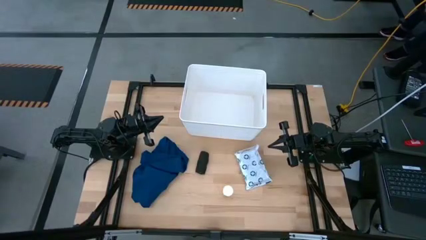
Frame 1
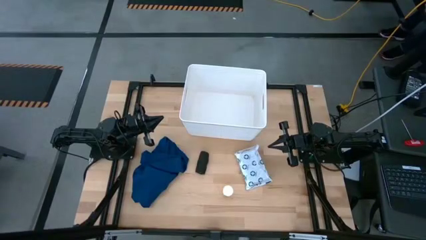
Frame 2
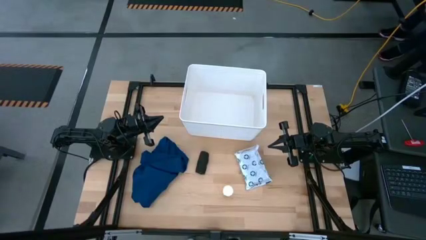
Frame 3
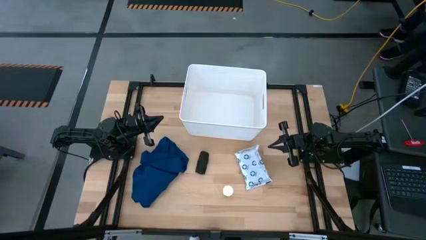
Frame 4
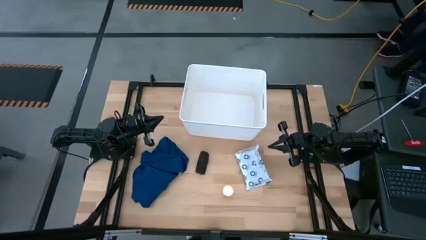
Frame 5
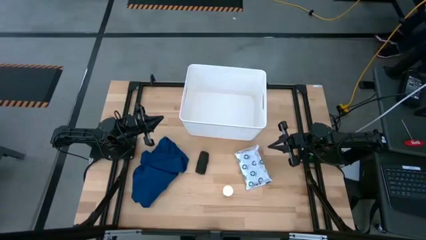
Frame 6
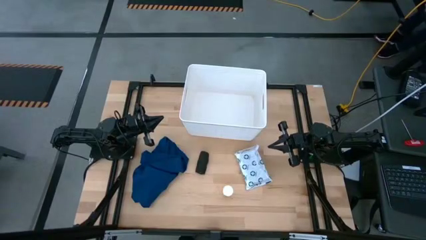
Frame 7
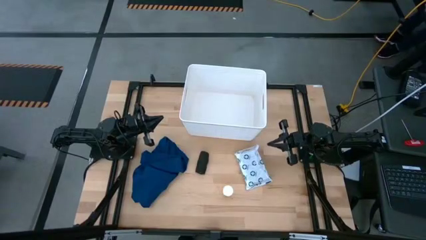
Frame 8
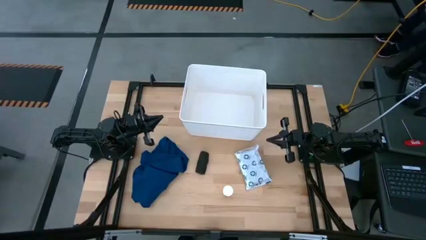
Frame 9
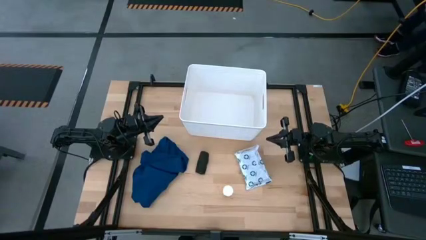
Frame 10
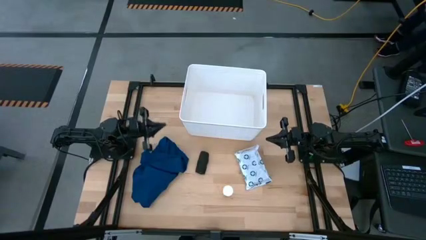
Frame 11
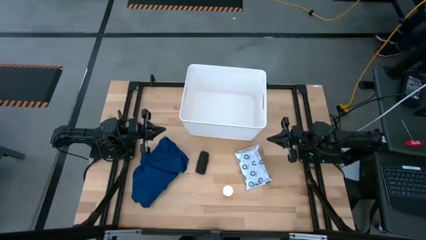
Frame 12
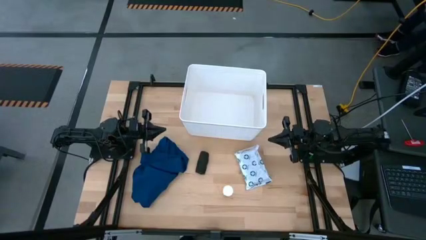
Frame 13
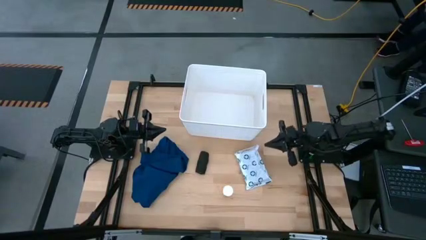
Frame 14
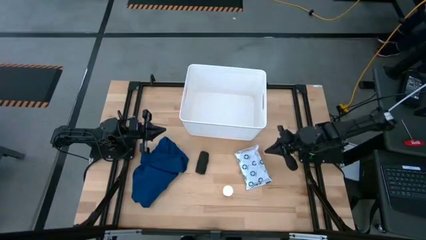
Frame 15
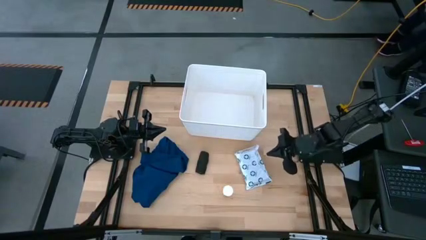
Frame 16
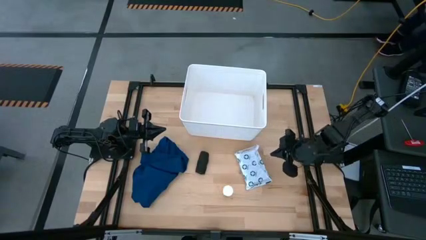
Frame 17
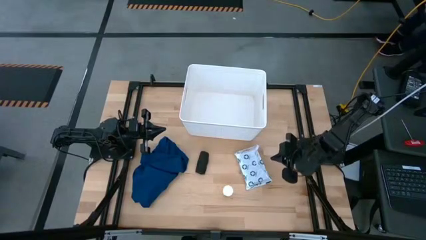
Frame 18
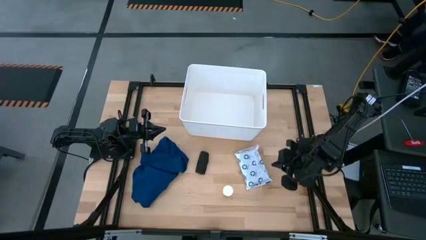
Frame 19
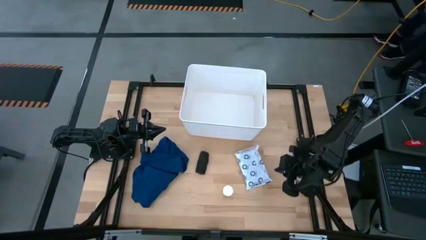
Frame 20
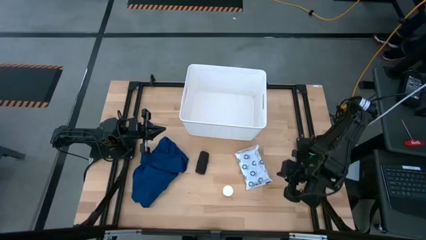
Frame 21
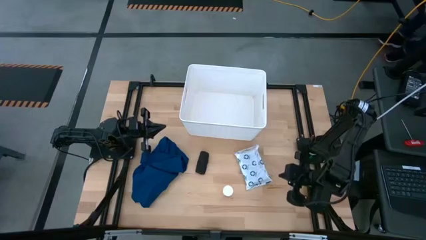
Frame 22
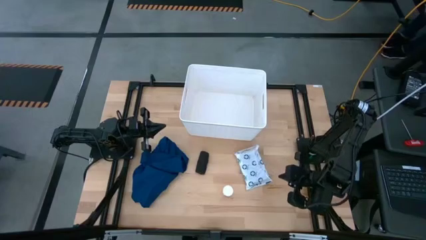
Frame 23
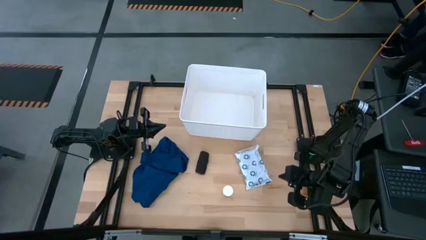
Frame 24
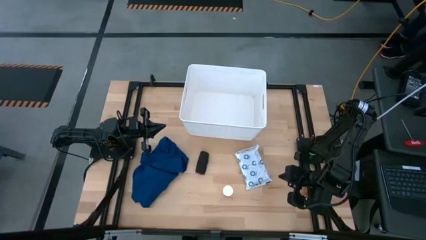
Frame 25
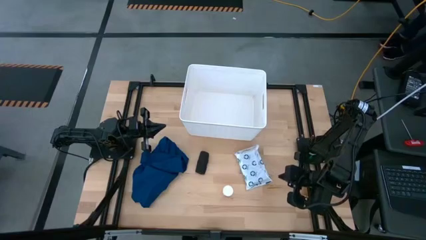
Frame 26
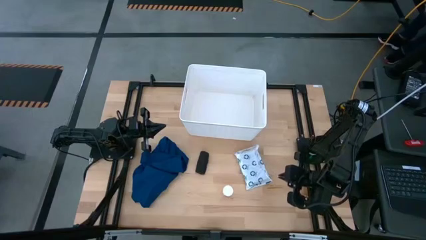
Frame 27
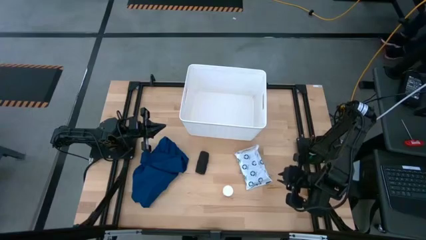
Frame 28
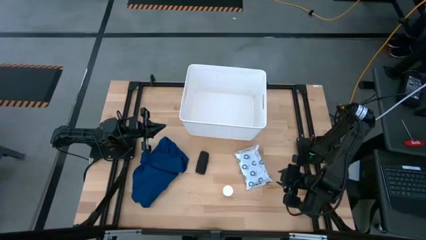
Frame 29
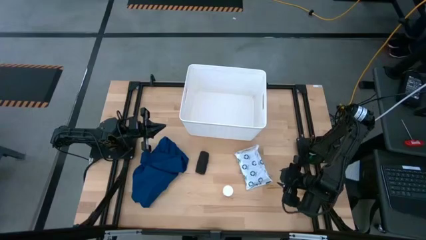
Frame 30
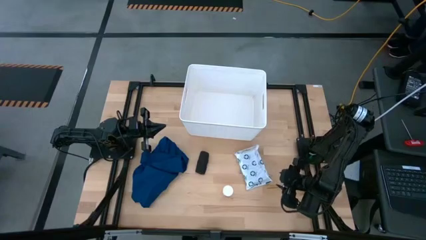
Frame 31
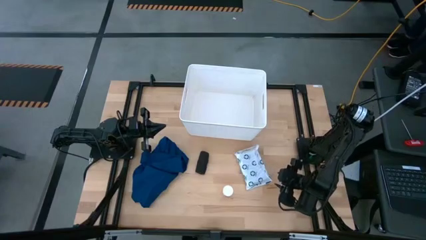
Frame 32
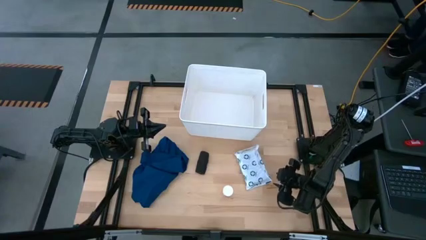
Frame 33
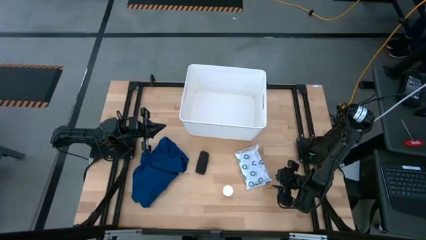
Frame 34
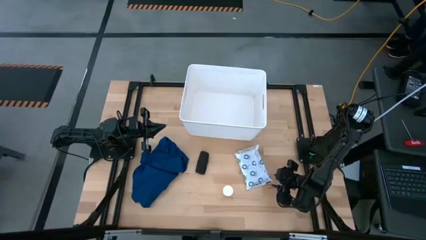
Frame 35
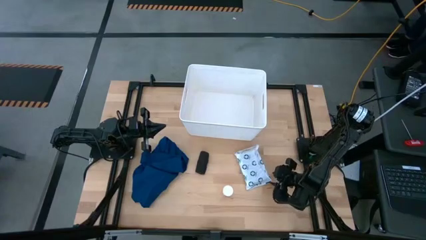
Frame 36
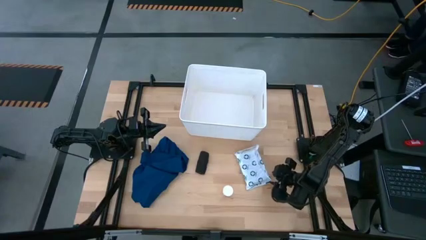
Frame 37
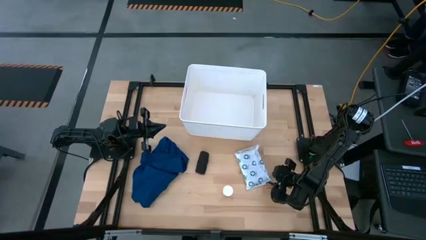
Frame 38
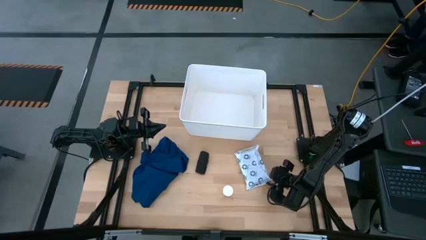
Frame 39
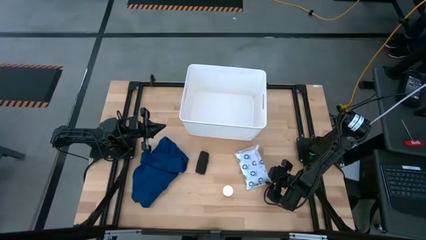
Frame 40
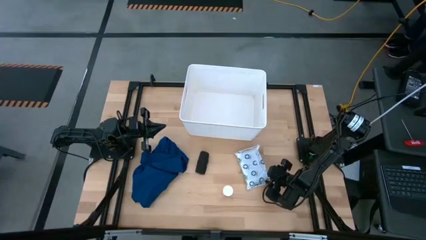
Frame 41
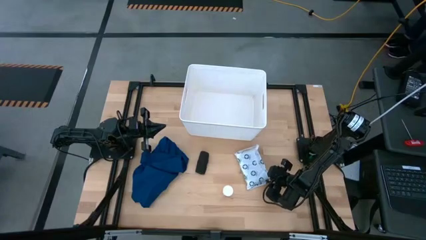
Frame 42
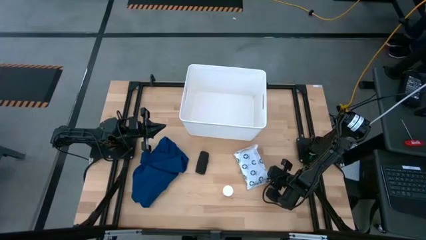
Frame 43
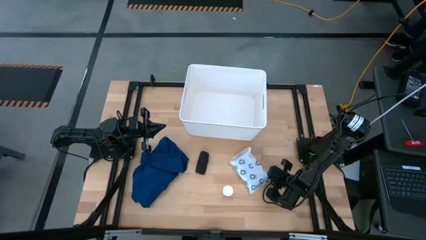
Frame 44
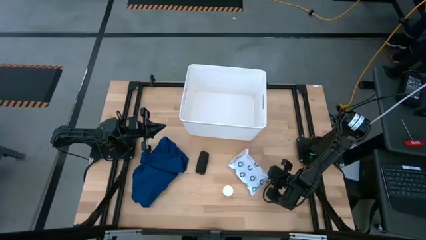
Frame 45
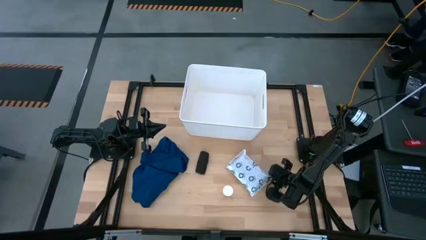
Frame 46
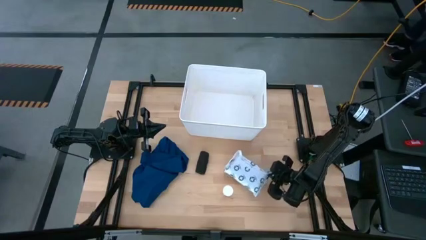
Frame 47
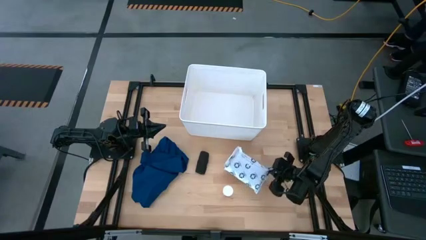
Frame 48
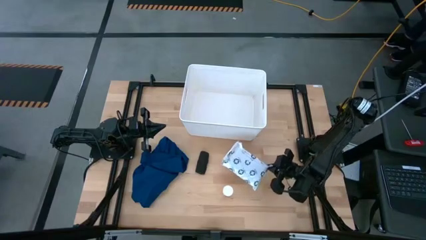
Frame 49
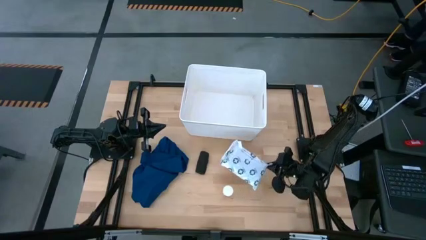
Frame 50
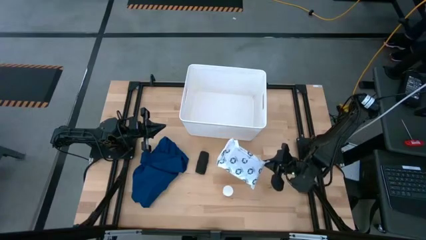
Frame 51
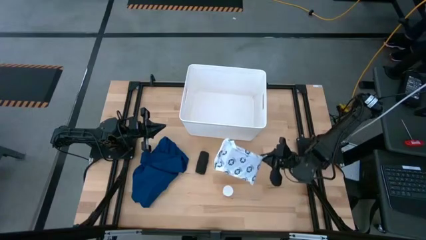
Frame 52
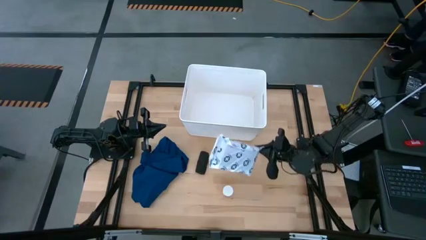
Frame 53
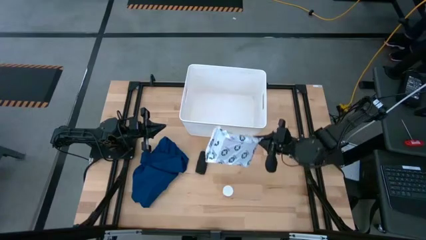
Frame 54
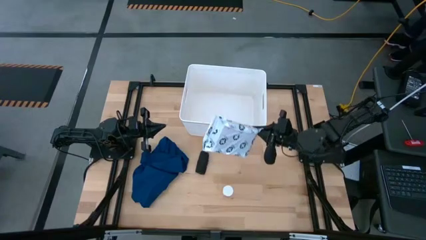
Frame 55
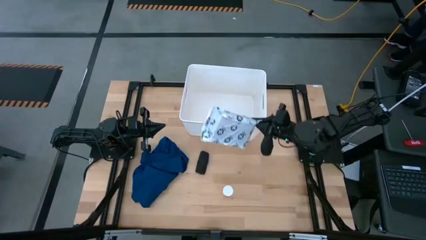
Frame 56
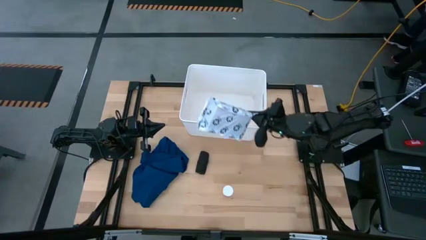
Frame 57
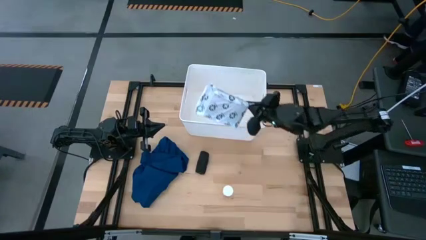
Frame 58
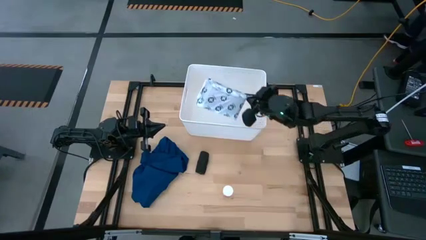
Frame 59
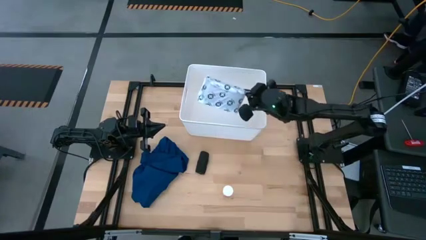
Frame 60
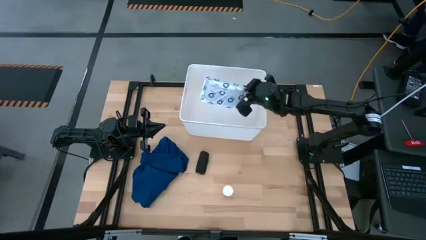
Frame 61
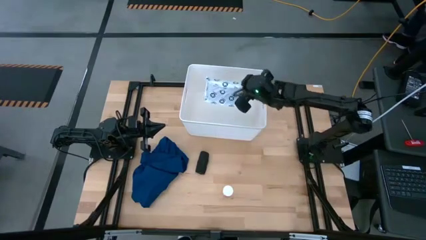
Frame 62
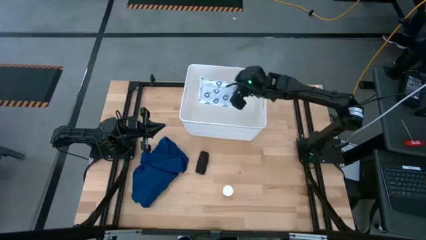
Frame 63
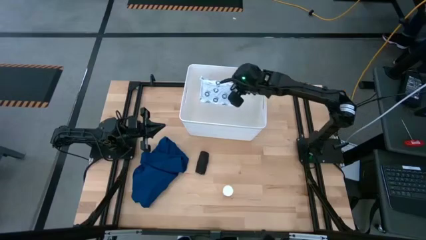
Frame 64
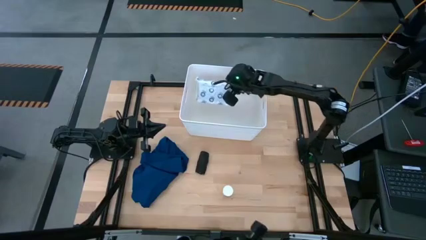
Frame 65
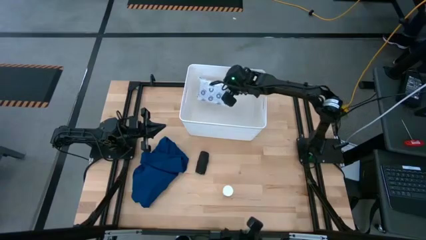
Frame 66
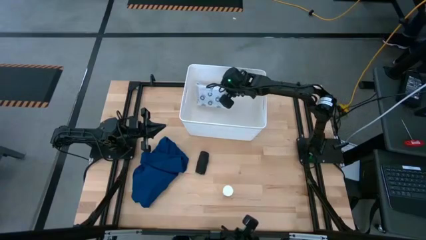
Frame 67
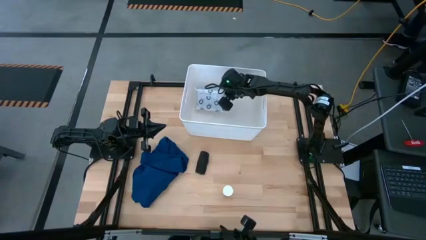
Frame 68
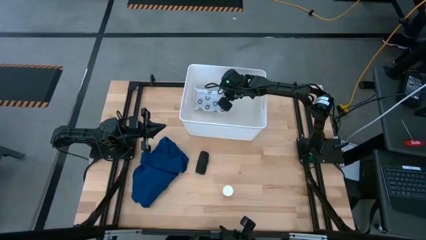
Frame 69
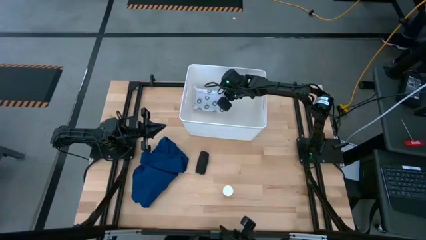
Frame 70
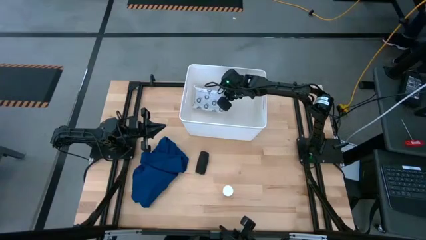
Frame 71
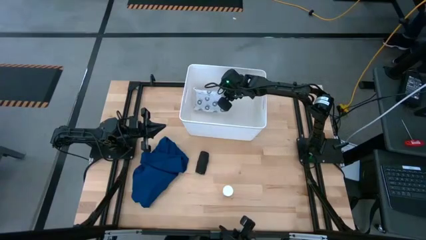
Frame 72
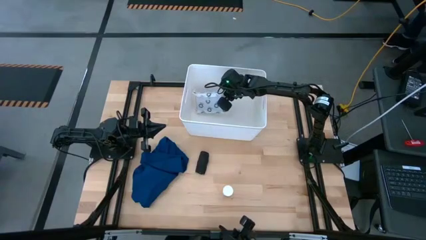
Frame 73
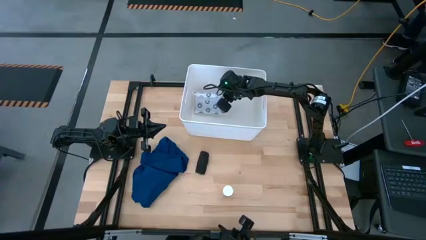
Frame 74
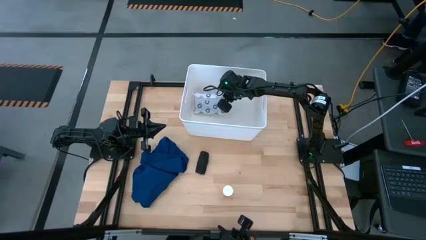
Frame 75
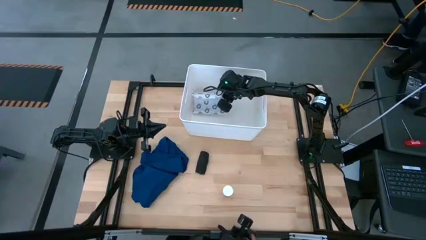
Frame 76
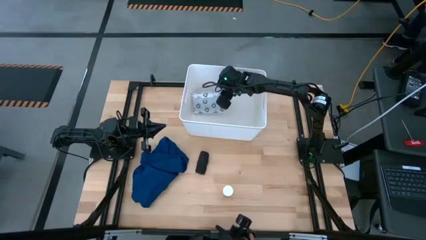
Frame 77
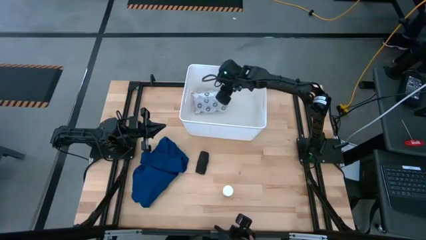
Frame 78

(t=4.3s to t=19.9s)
Task: Pick & place medical supplies in basket/bin
Put the mailer bag into the white bin
